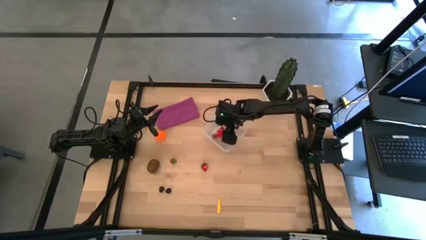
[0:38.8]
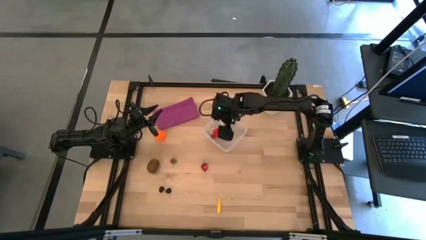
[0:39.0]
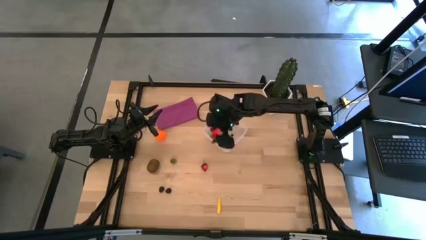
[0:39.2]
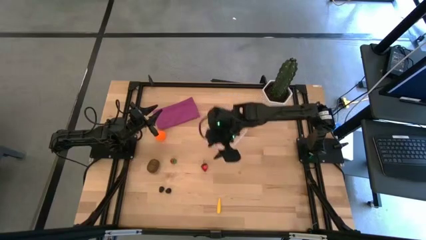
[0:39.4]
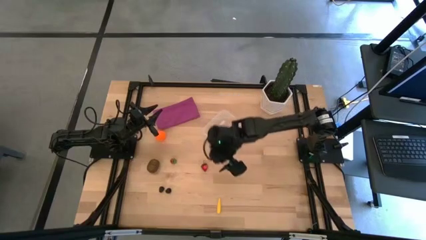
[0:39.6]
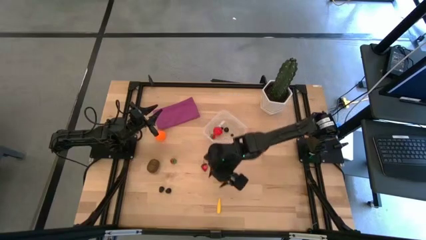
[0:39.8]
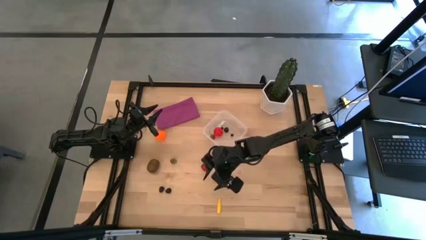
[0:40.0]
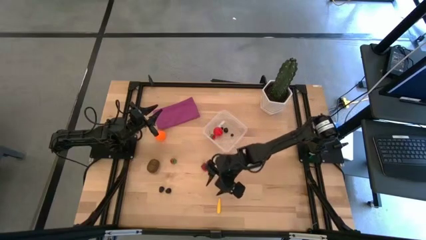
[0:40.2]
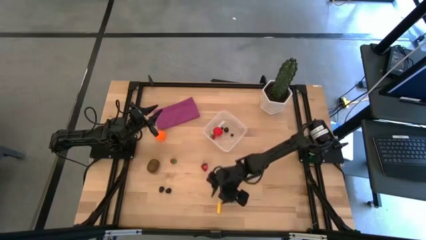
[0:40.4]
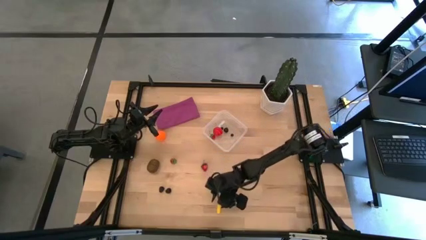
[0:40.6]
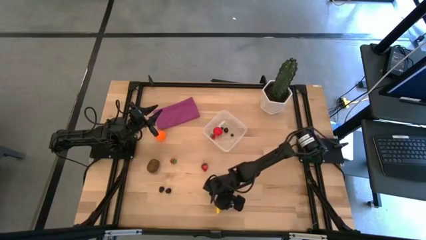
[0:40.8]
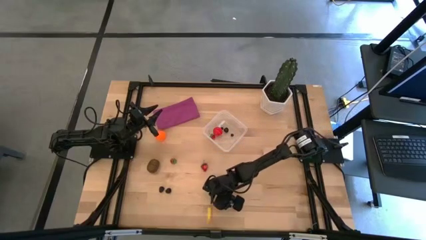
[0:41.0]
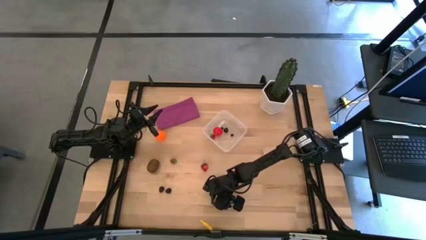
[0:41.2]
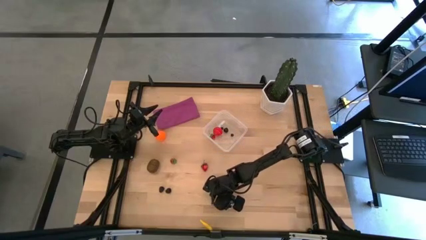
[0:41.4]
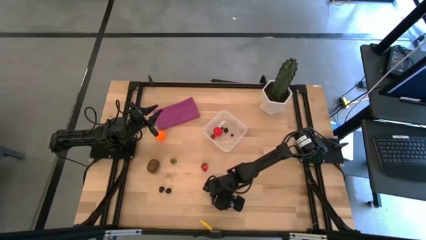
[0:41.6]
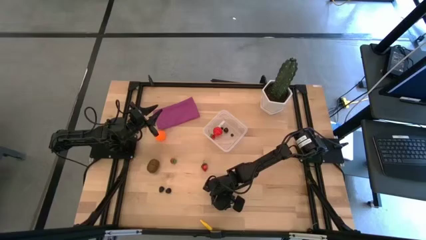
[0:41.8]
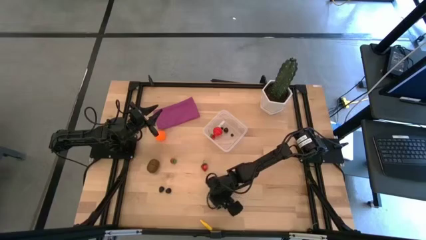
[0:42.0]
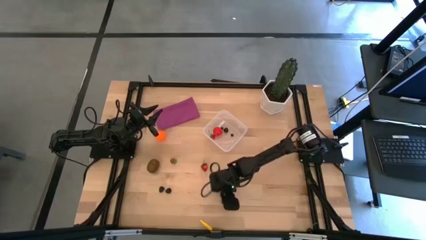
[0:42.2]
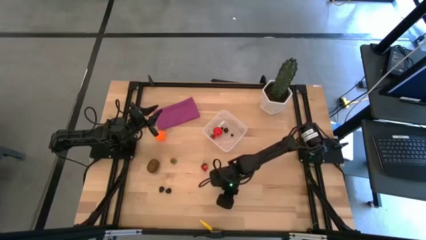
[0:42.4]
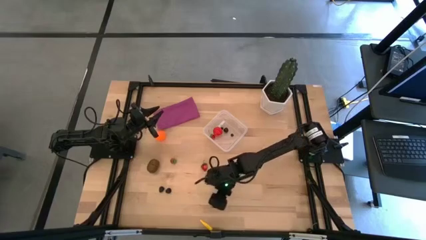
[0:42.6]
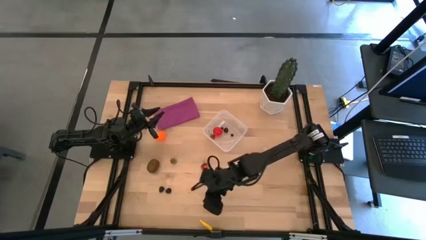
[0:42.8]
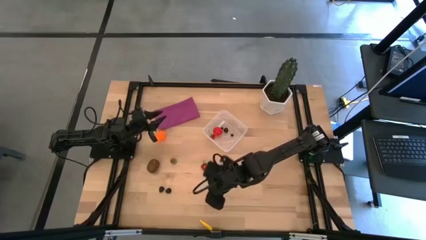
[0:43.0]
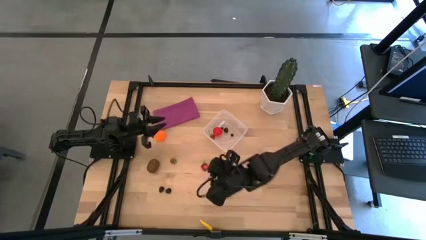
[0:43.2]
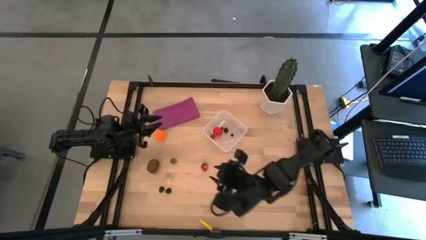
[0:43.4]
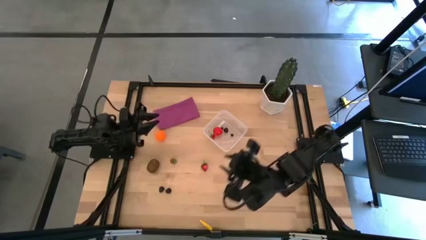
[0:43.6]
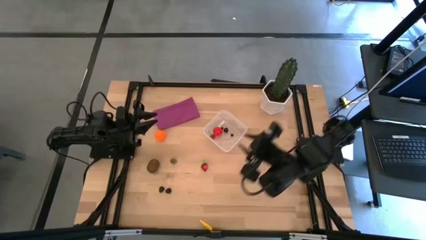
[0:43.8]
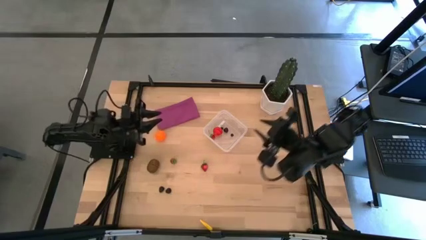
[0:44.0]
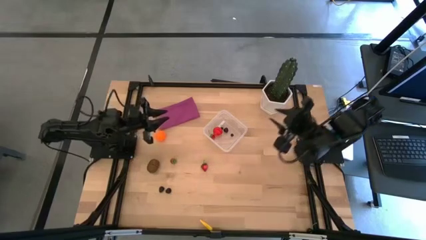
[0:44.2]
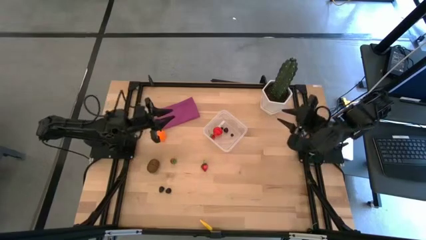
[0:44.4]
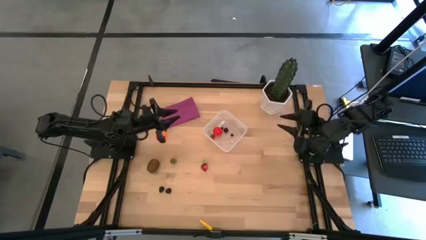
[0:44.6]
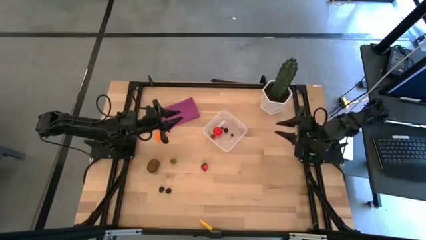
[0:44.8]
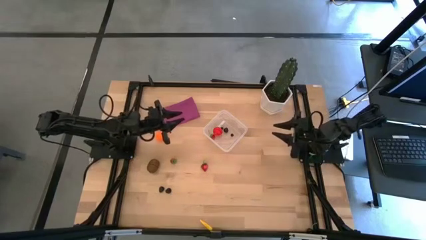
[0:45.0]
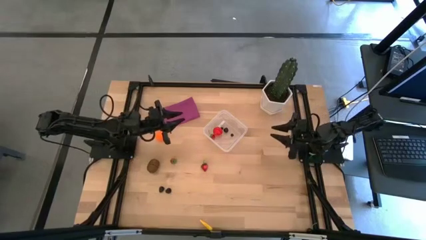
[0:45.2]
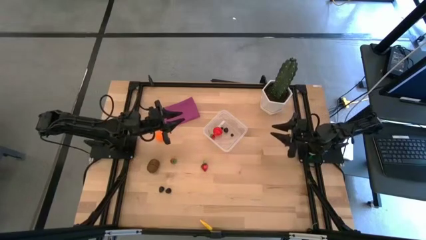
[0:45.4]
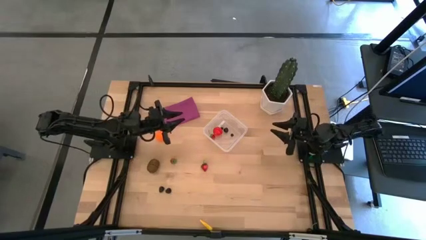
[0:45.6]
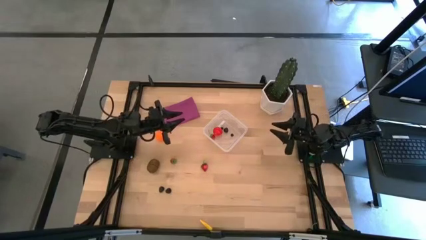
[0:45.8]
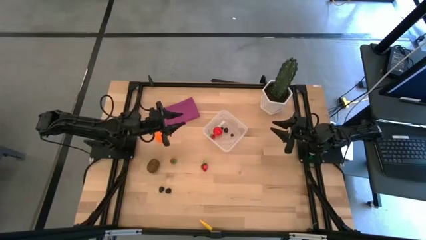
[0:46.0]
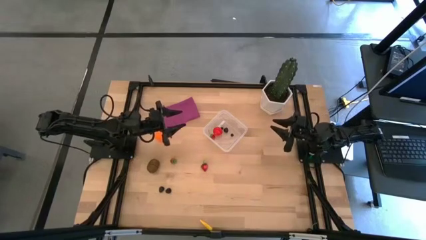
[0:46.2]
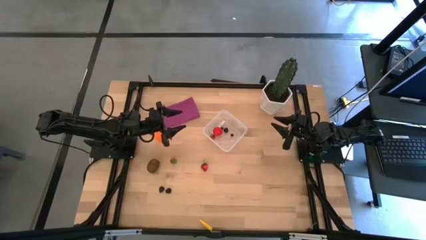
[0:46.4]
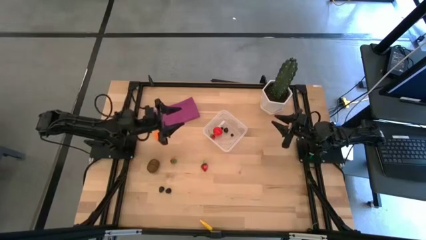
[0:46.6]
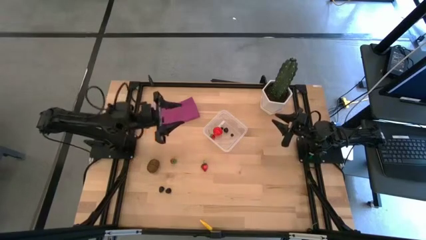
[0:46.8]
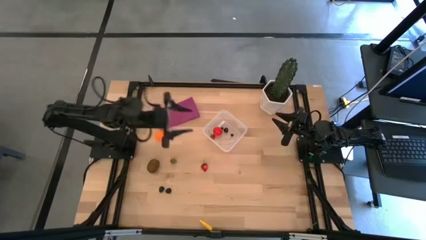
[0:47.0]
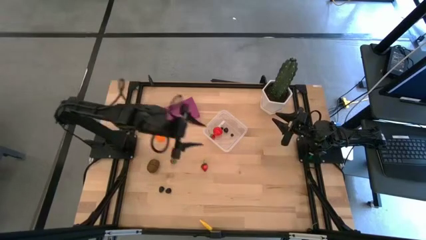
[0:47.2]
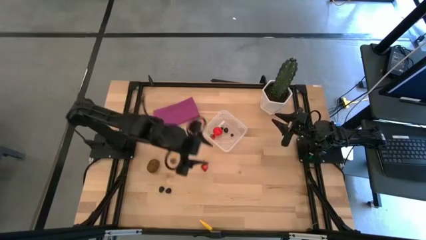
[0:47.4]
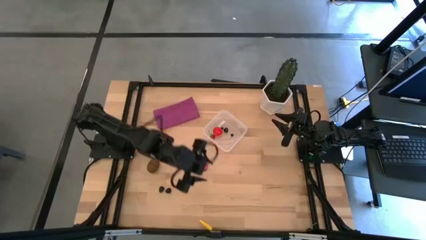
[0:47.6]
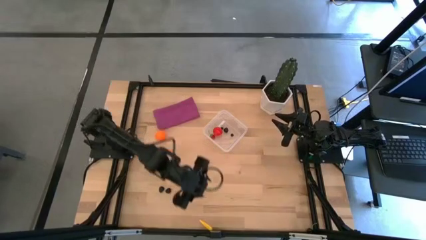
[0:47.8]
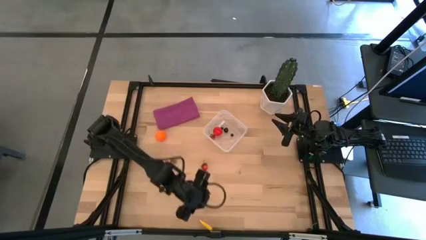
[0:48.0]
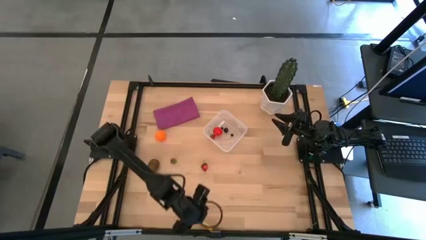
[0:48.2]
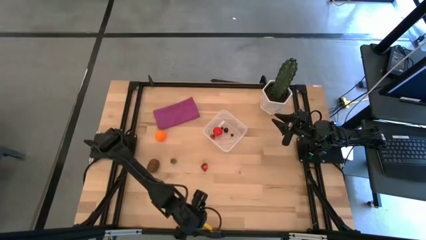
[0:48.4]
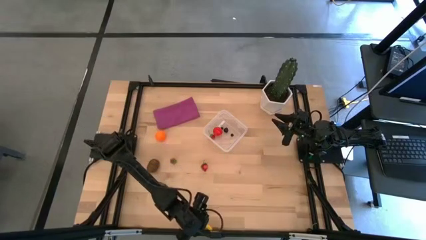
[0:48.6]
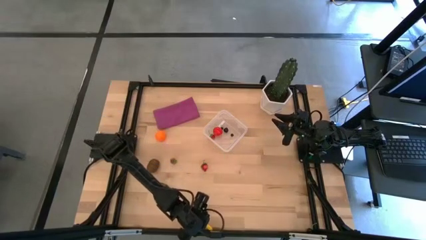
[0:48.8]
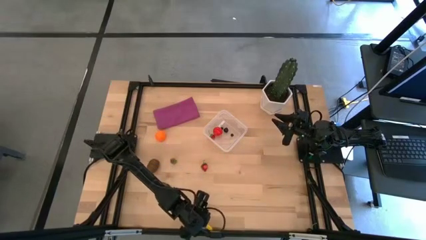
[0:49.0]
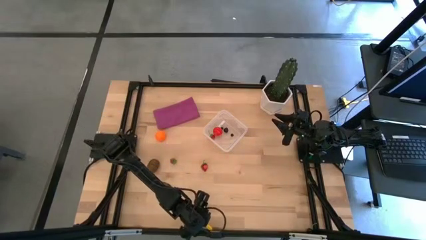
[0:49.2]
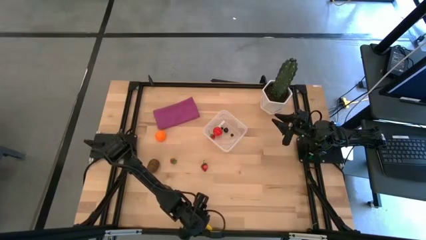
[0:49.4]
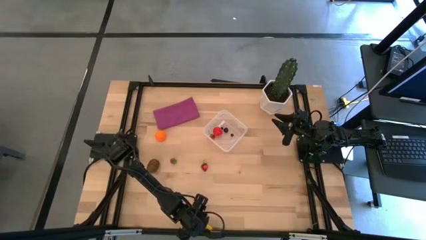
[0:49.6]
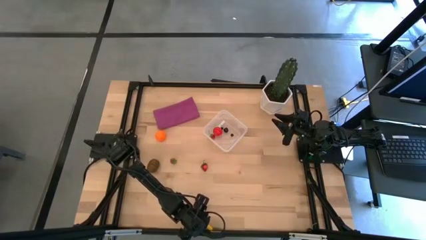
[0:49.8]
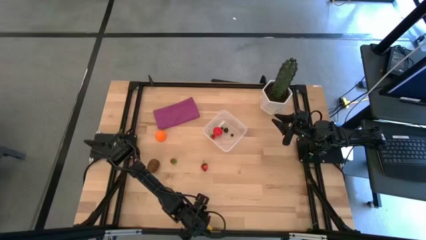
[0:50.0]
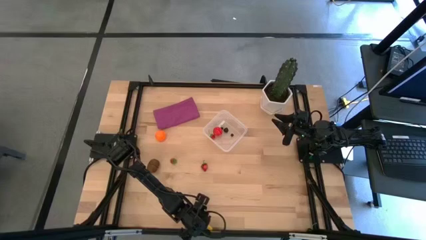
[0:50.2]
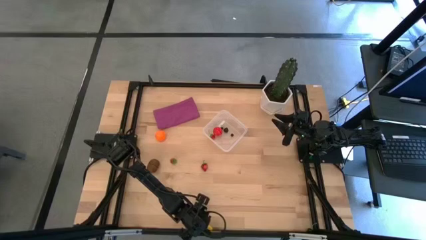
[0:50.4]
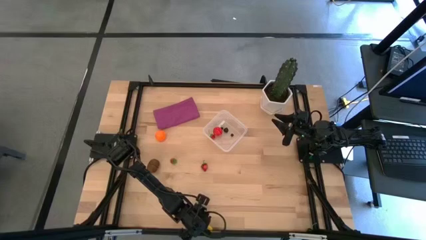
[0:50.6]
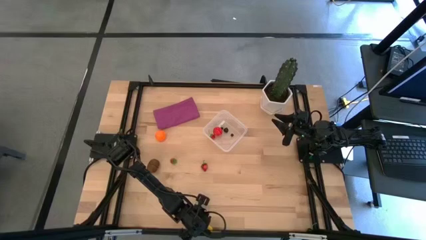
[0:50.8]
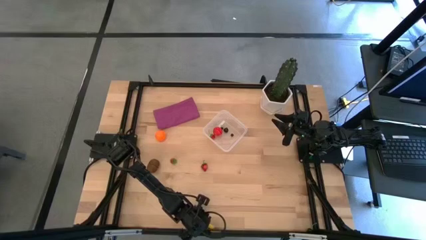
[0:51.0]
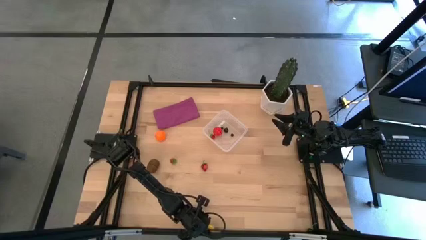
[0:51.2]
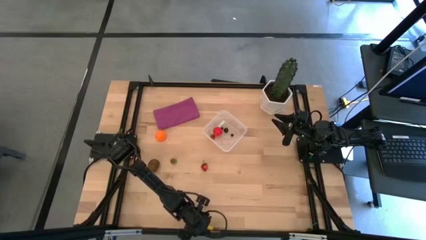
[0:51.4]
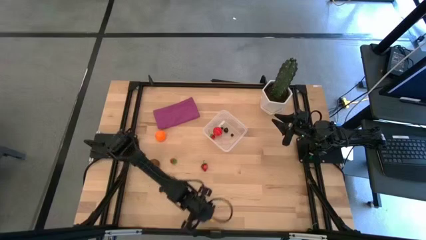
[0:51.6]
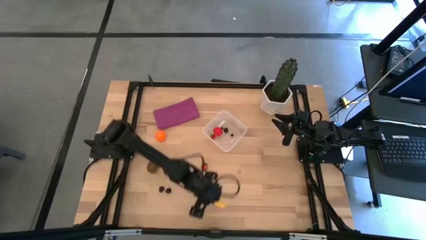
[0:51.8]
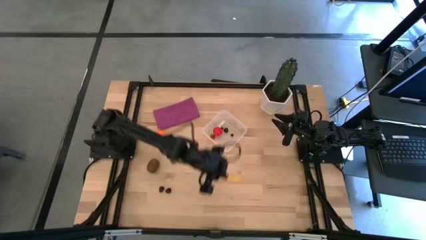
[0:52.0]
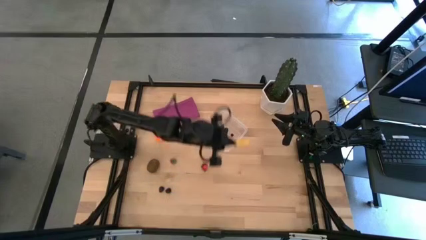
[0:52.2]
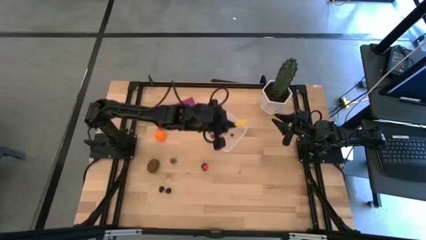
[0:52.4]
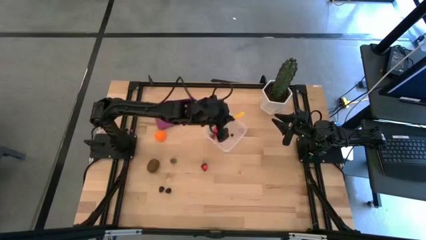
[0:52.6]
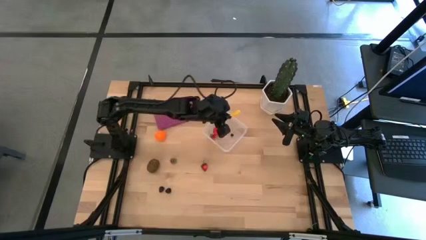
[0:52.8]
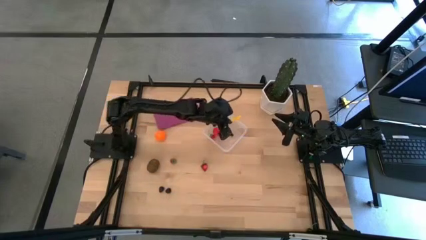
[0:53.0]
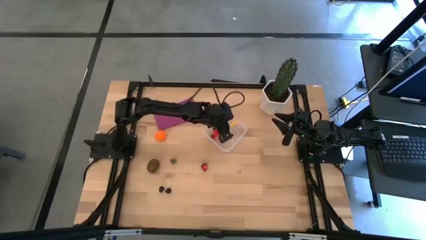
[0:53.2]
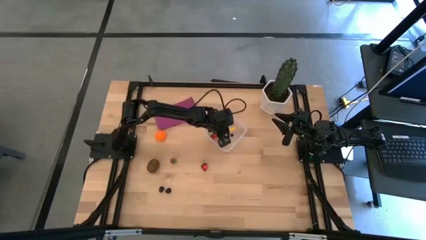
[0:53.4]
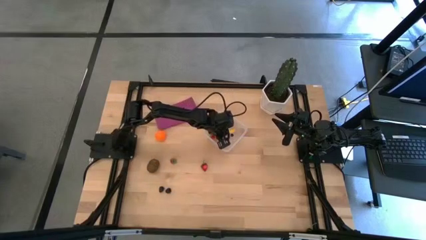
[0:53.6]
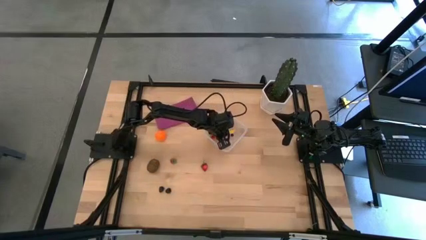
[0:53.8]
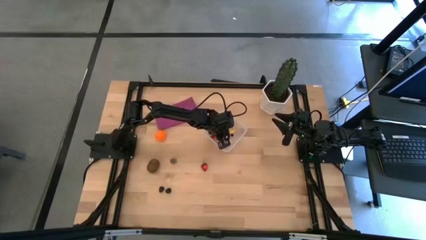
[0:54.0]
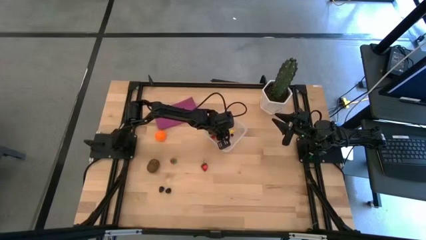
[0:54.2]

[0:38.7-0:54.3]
Task: Pick and placing Produce into tupperware
Put the yellow corn into the transparent container
